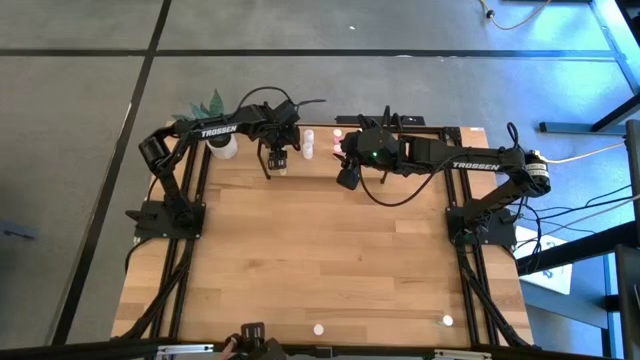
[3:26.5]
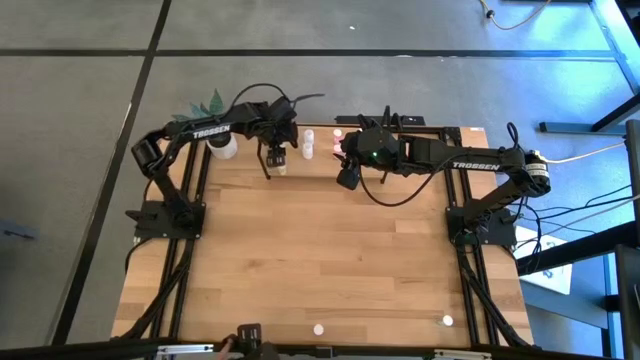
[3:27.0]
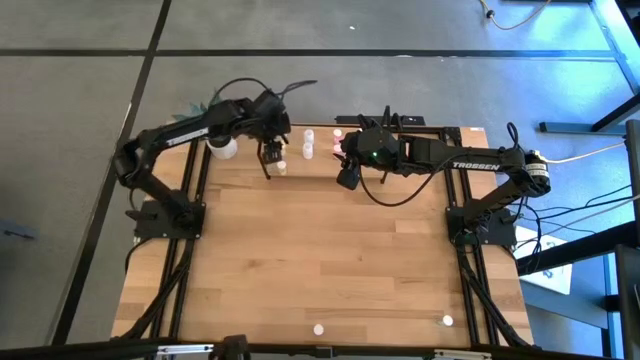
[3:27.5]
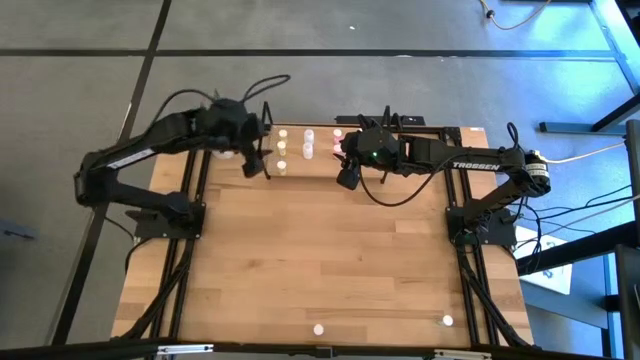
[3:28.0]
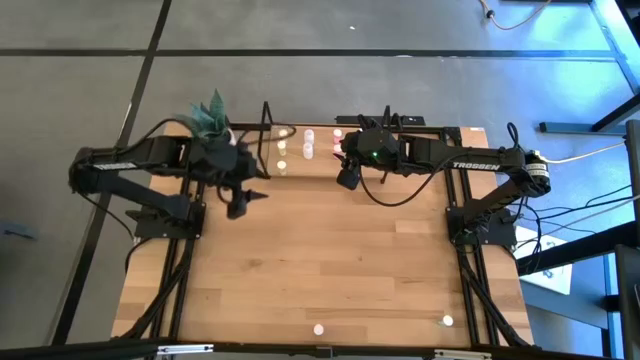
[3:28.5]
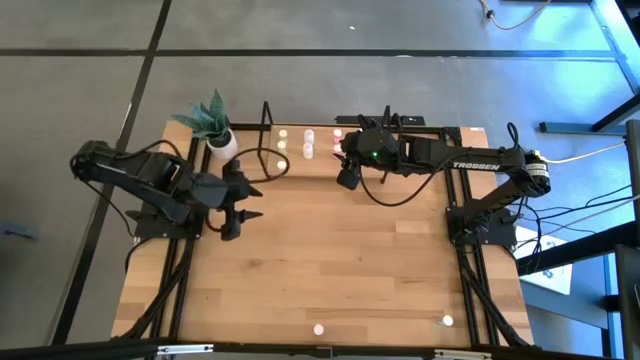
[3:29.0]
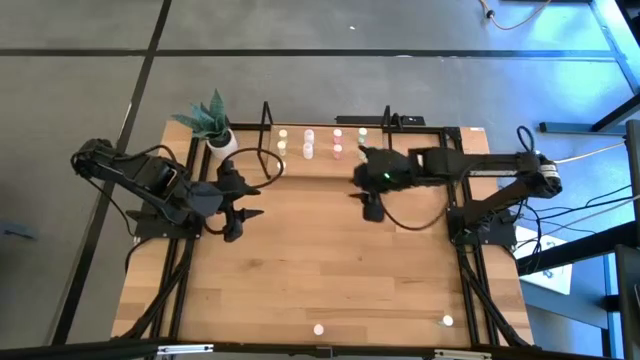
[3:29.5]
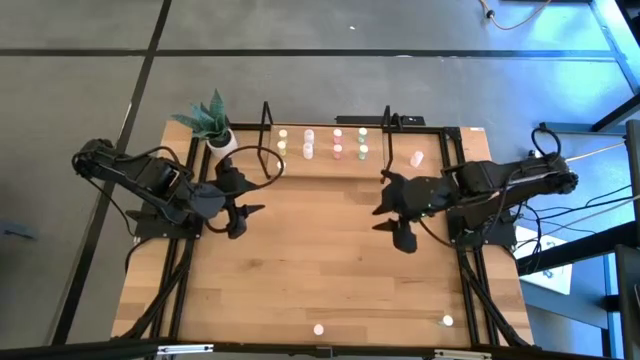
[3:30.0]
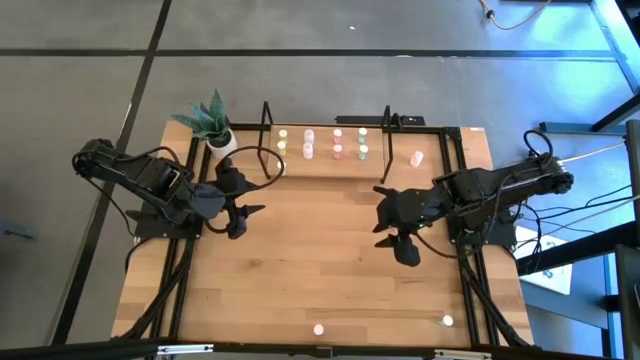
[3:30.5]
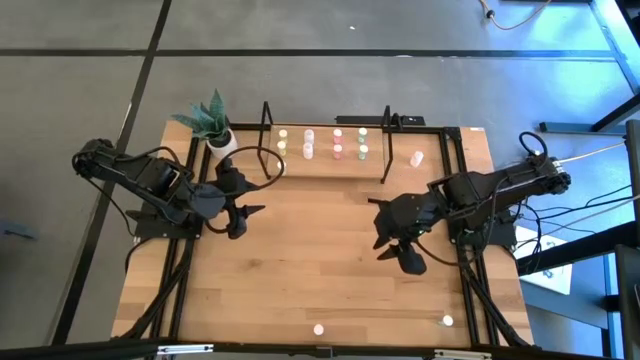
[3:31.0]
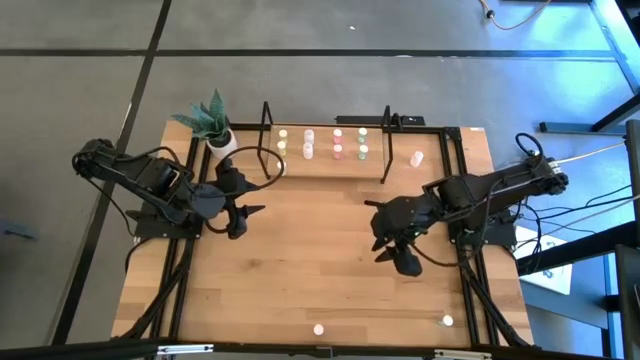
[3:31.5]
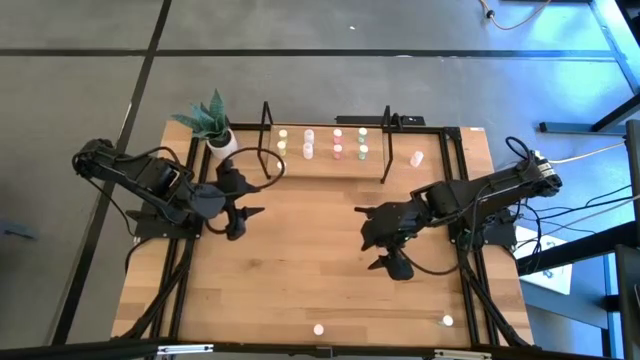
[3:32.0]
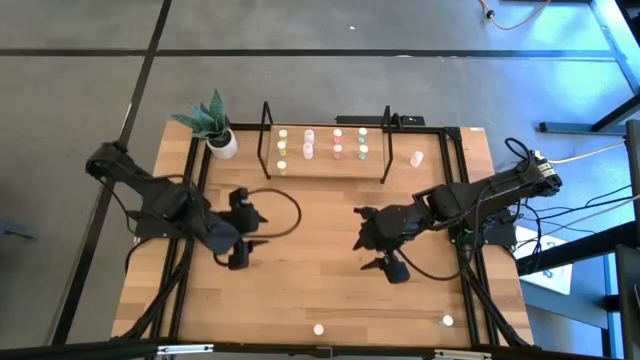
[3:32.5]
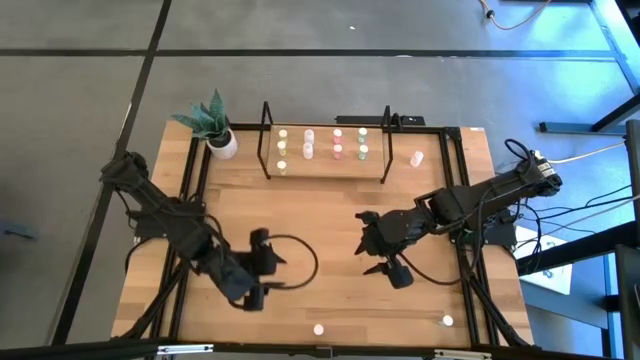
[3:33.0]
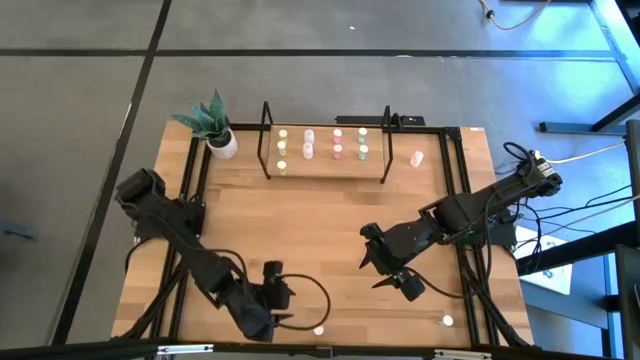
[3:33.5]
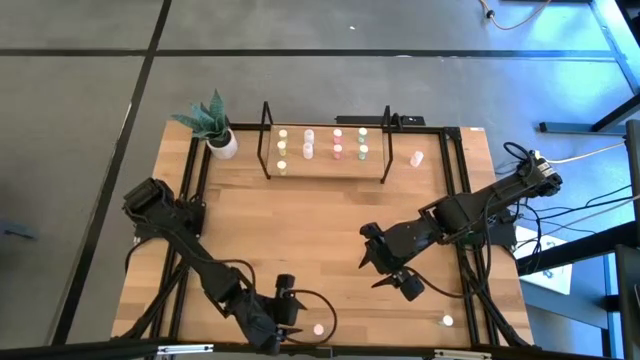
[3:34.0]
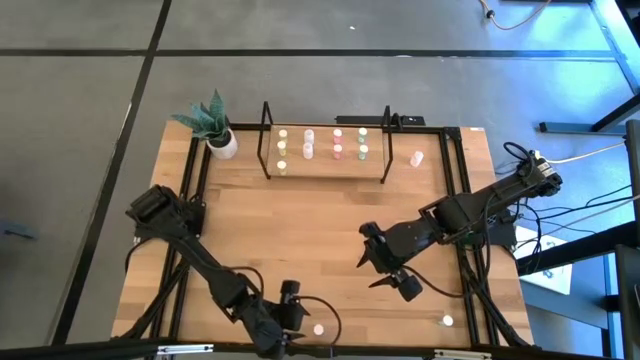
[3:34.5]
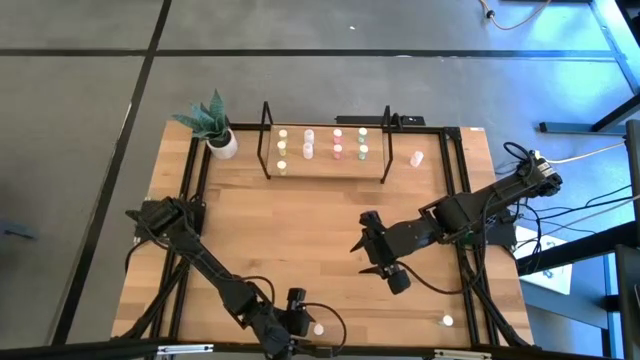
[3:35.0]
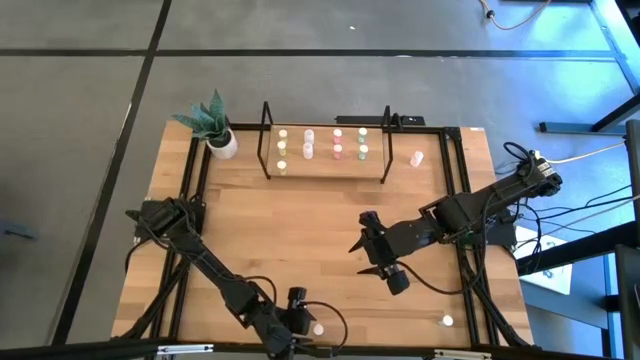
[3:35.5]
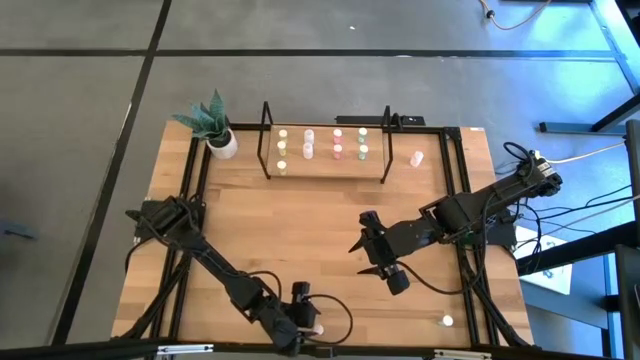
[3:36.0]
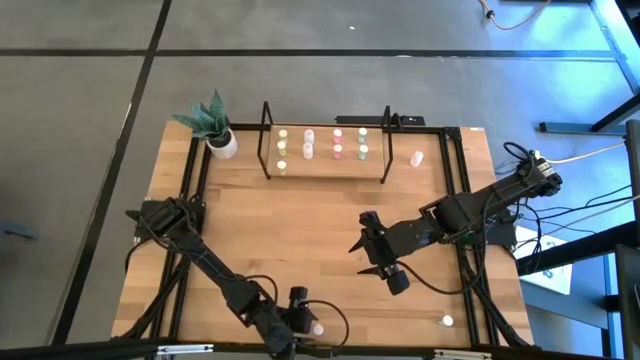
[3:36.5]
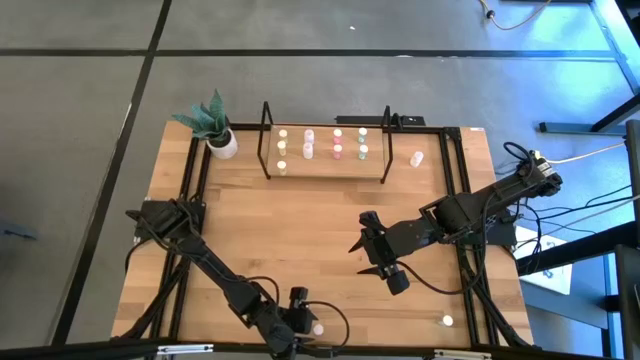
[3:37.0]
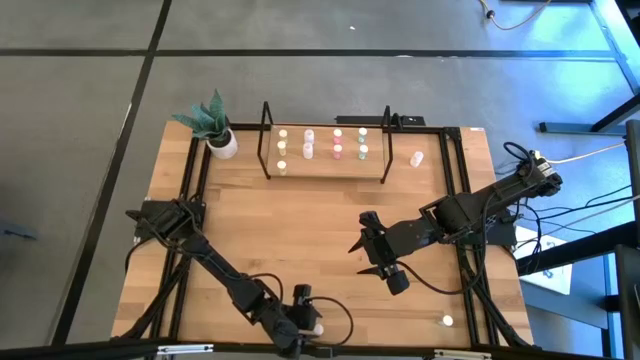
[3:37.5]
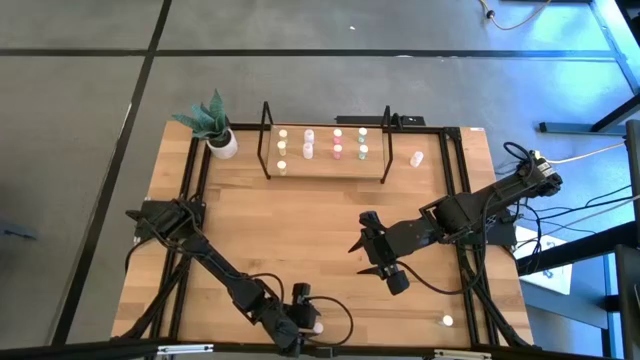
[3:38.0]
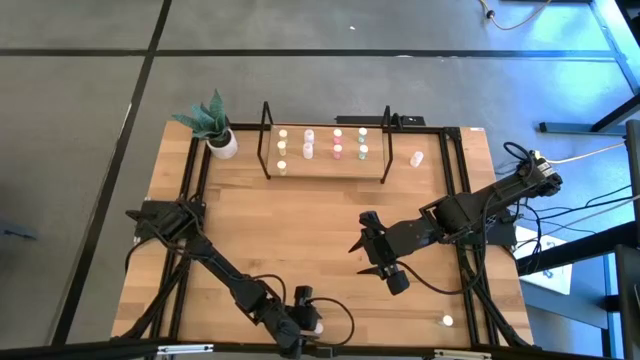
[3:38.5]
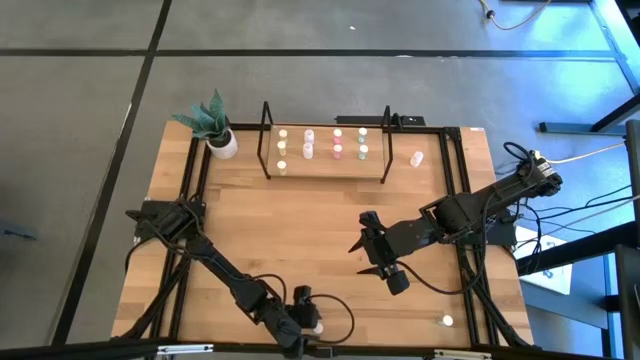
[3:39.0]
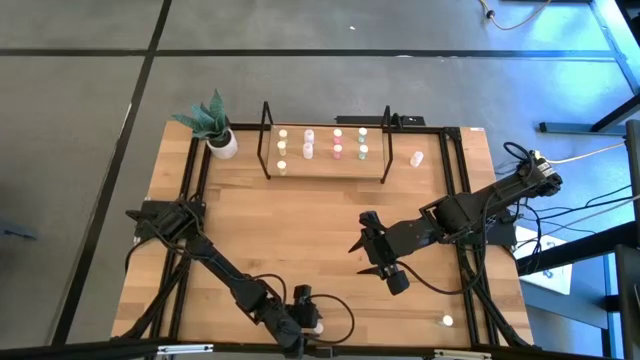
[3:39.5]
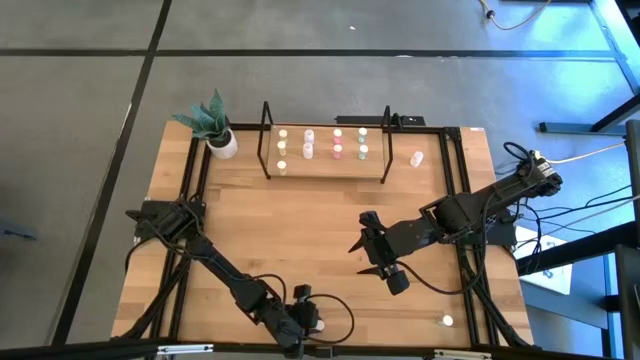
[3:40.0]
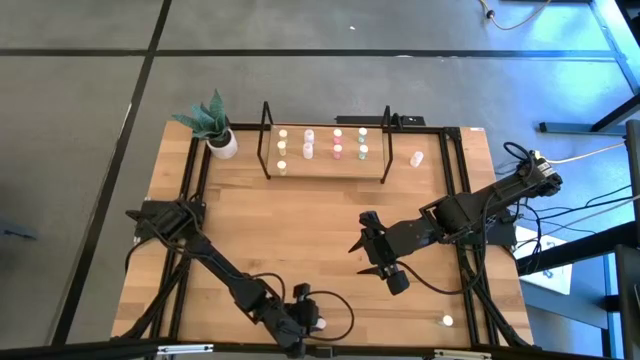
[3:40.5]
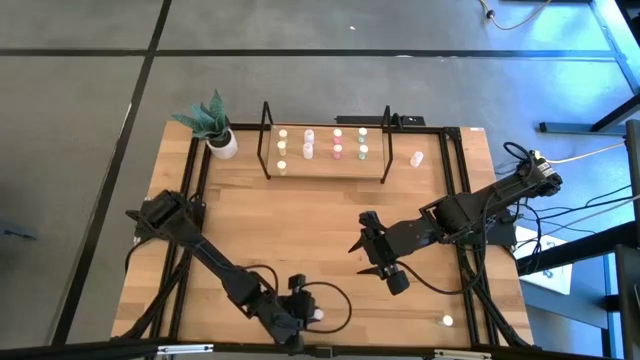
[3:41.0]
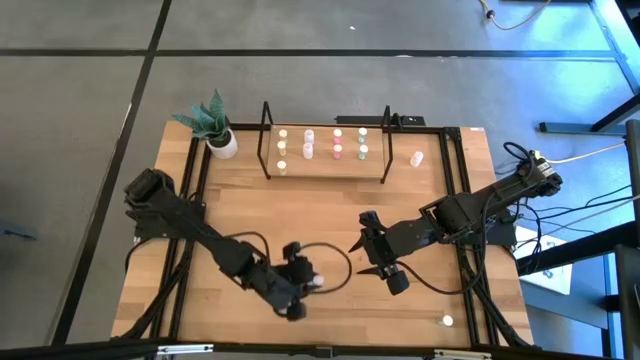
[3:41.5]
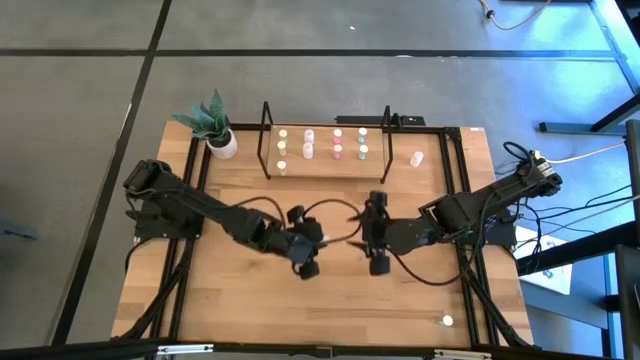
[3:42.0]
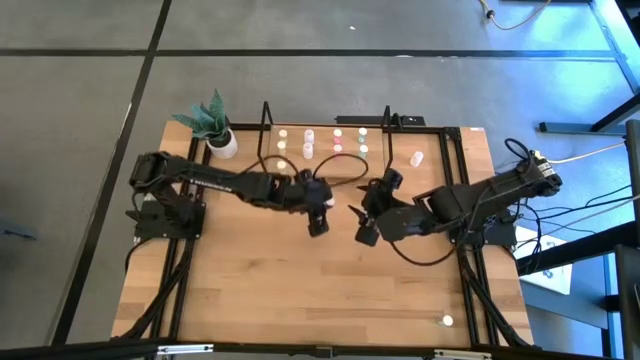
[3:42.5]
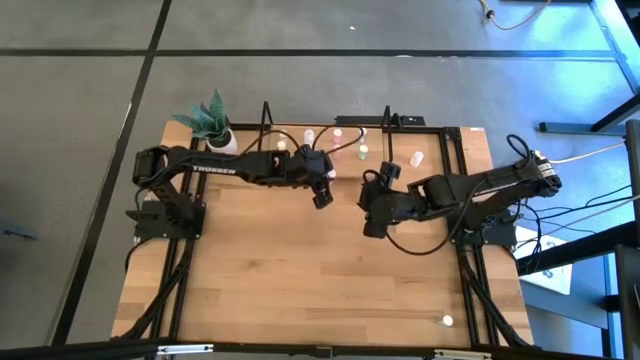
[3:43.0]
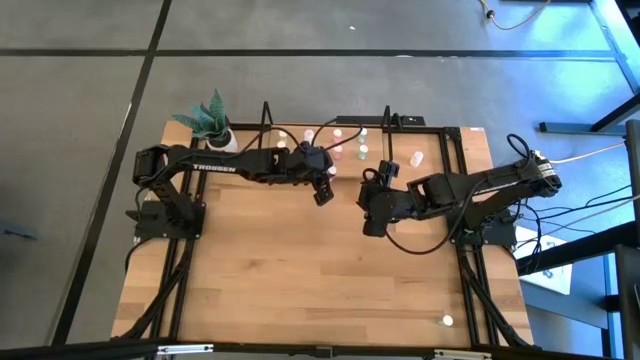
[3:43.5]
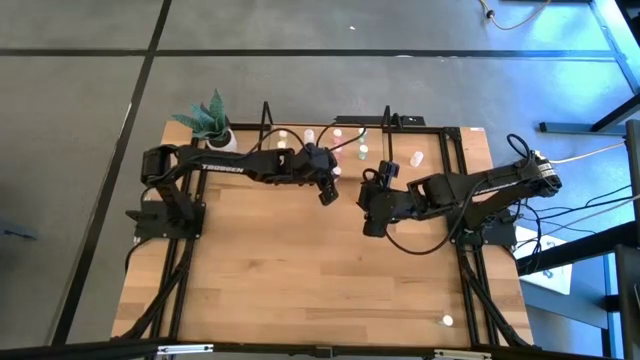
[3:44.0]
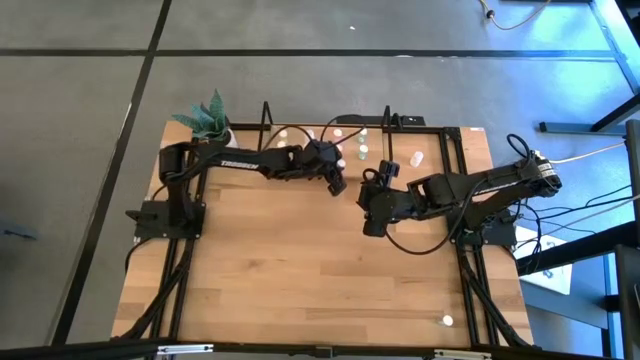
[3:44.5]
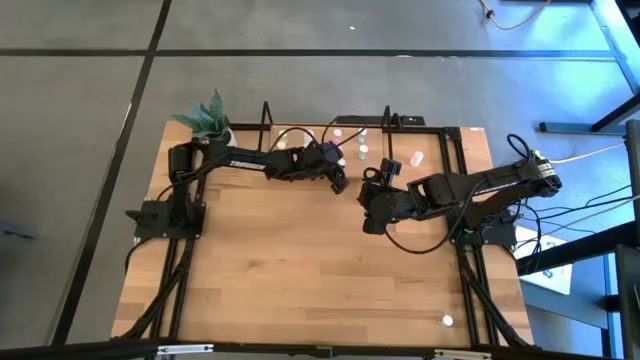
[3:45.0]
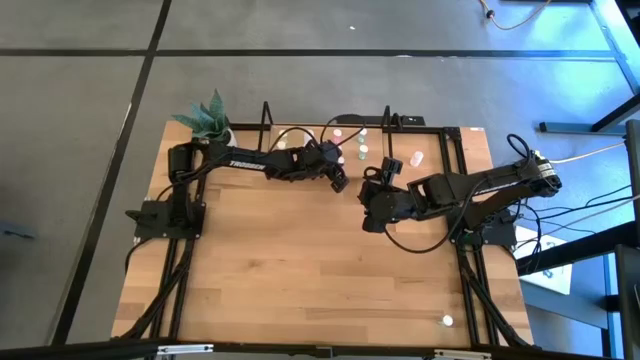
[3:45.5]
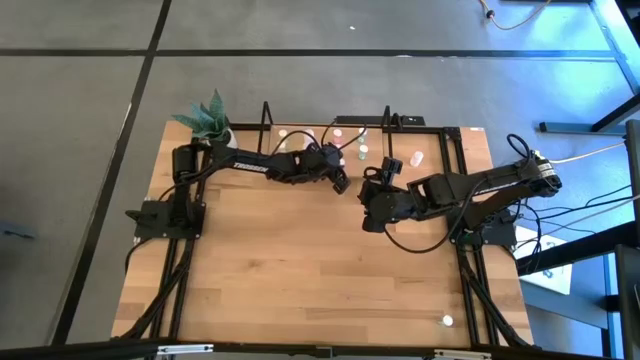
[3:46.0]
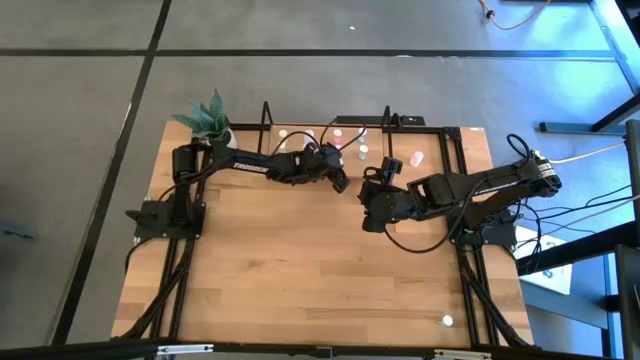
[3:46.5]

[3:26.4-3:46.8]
Task: Pick and place medicine bottles onto shelf by color
Put the pink bottle on the shelf aligned with other pink pill bottles

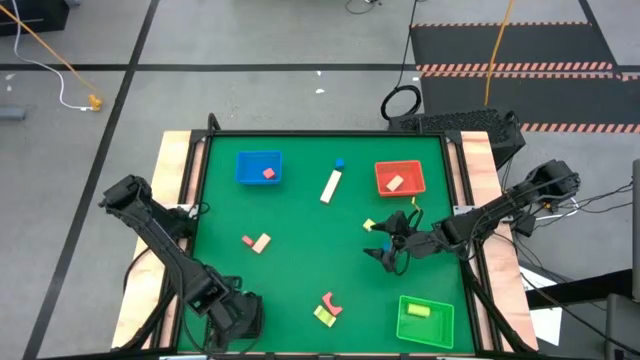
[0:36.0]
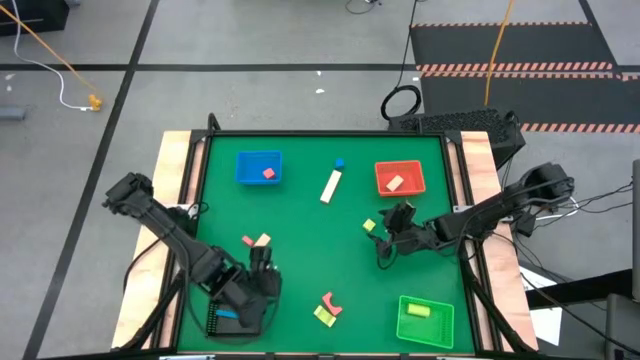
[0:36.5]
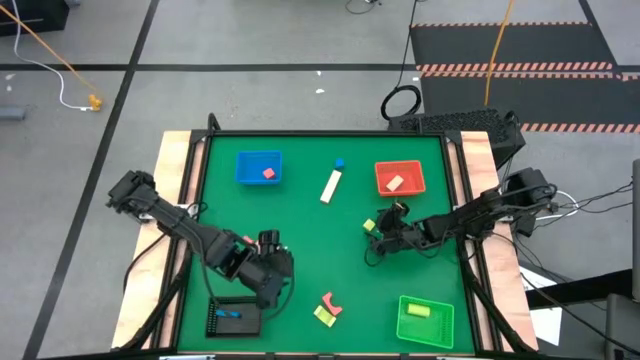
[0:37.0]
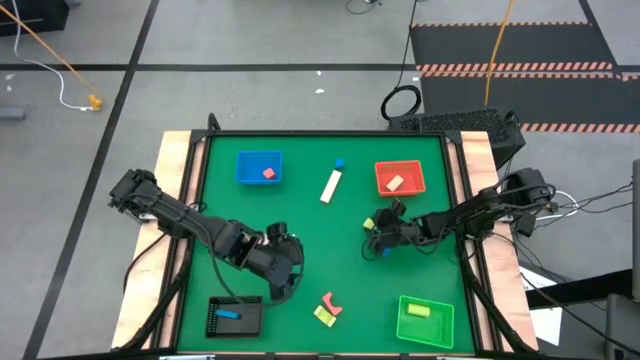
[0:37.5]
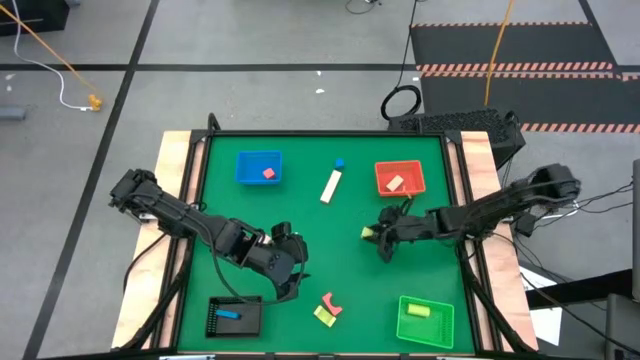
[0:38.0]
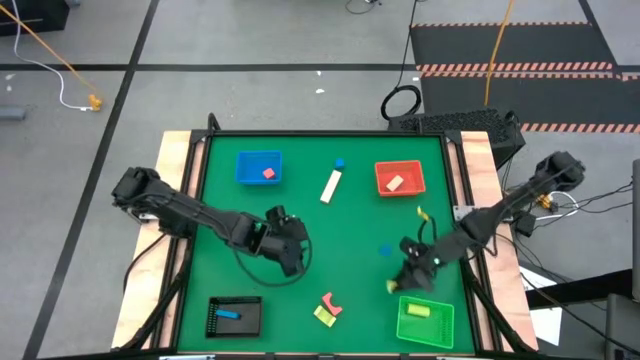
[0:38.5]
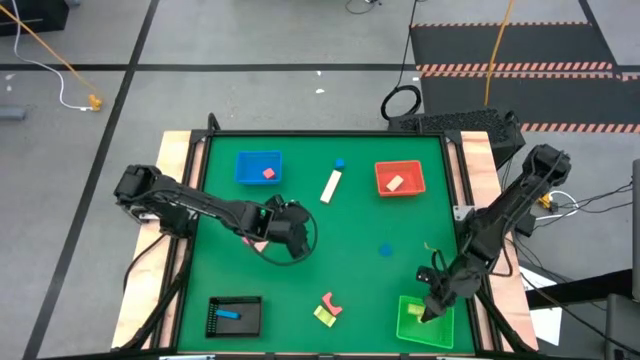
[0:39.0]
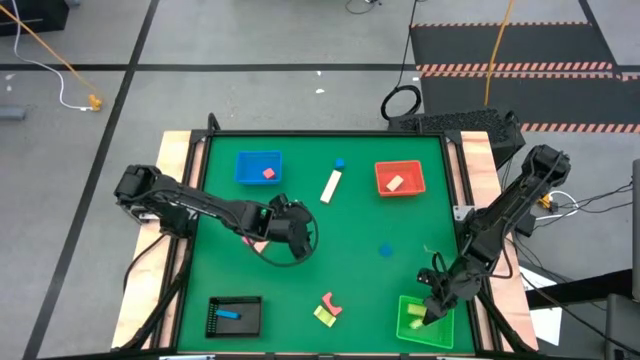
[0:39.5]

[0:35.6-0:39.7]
Task: Sort & place blocks by color
Put the top green block in the green basket
